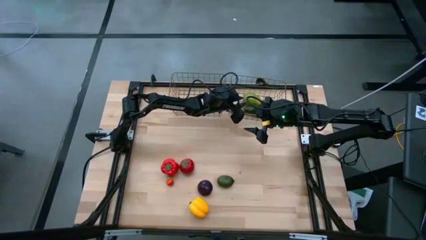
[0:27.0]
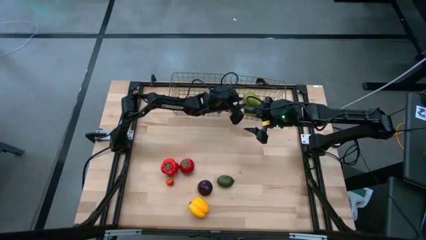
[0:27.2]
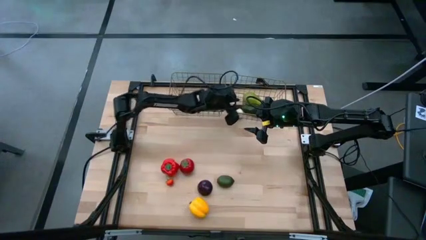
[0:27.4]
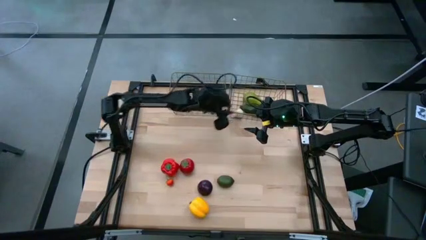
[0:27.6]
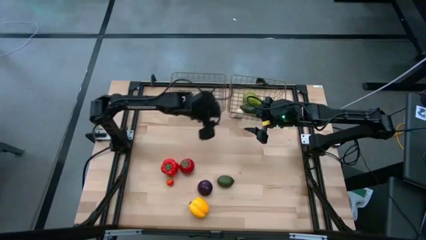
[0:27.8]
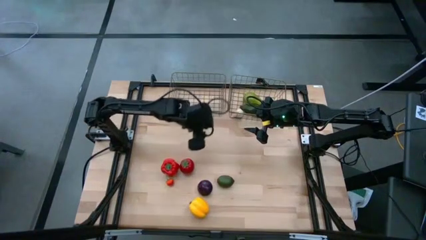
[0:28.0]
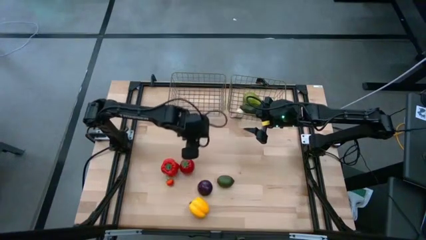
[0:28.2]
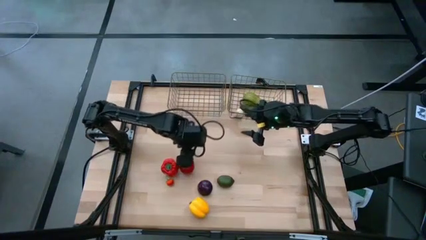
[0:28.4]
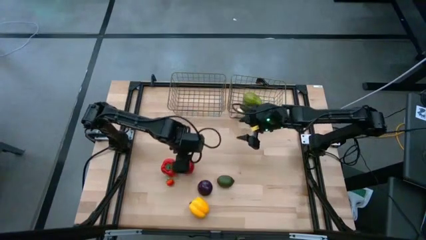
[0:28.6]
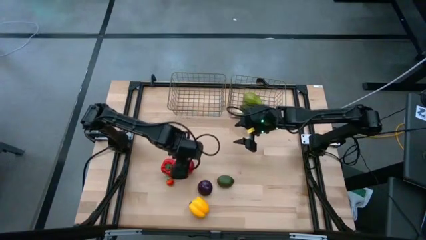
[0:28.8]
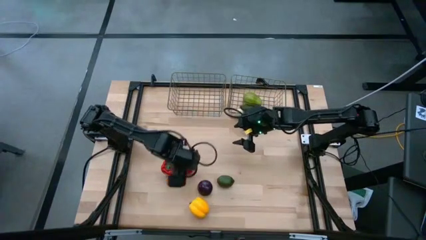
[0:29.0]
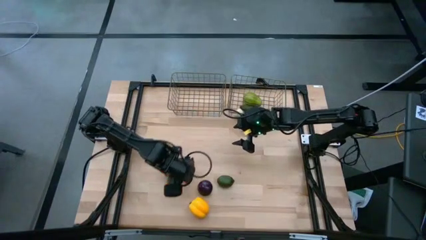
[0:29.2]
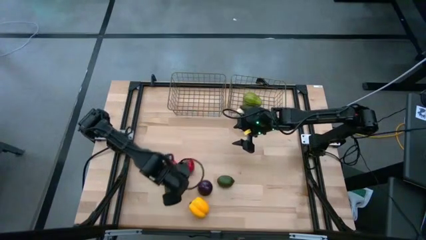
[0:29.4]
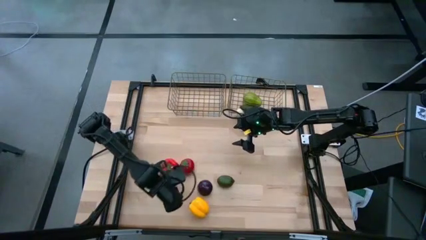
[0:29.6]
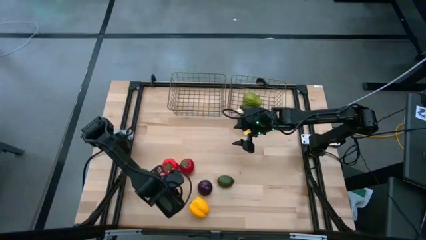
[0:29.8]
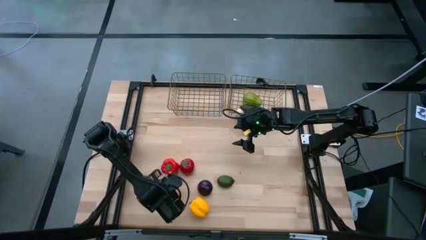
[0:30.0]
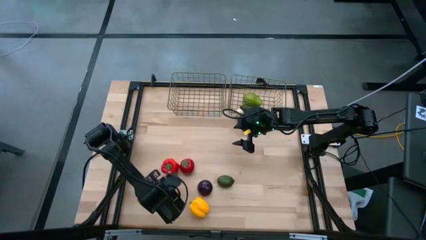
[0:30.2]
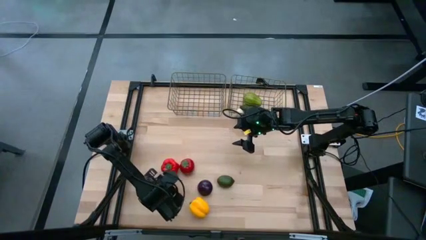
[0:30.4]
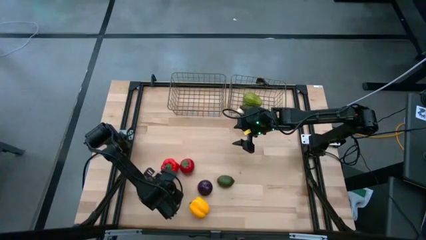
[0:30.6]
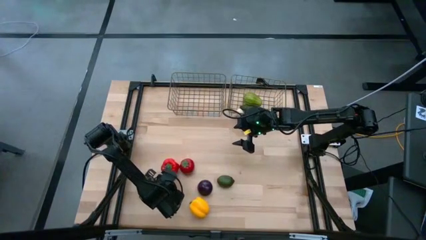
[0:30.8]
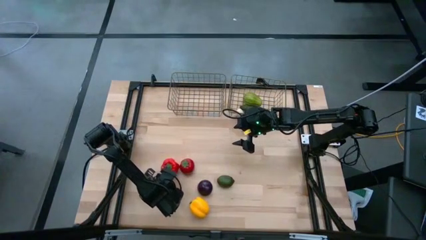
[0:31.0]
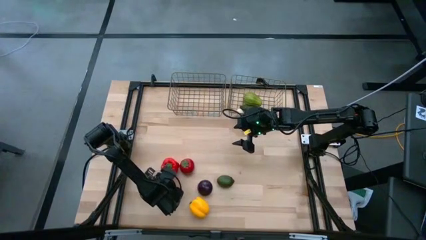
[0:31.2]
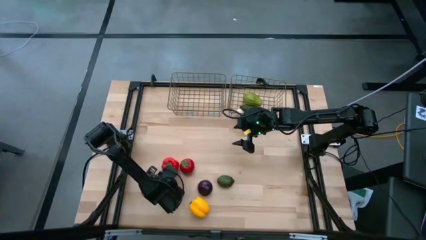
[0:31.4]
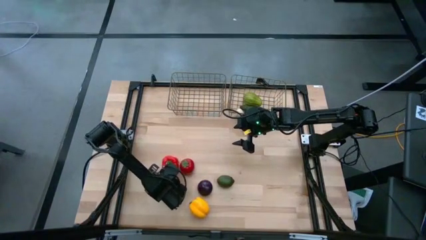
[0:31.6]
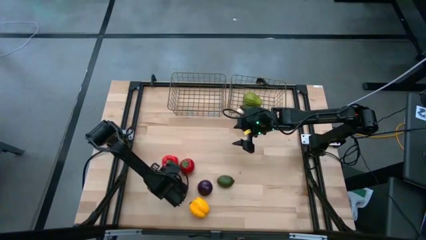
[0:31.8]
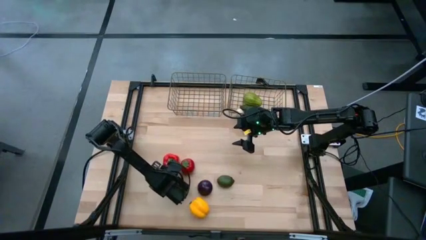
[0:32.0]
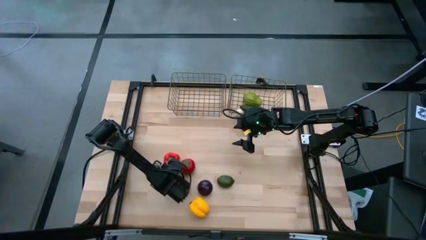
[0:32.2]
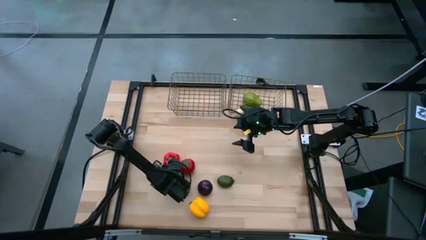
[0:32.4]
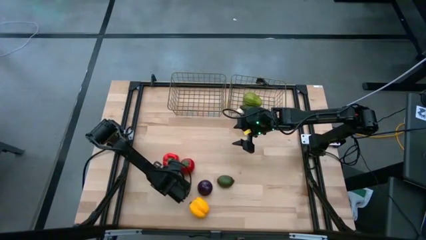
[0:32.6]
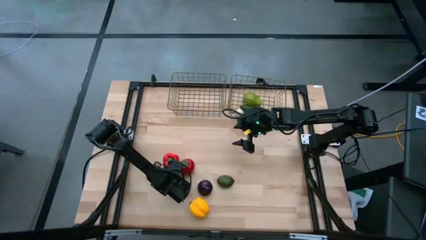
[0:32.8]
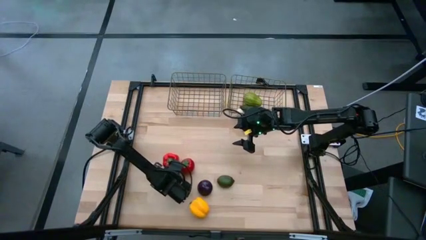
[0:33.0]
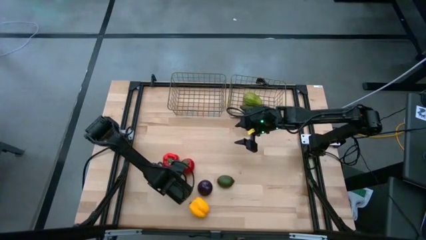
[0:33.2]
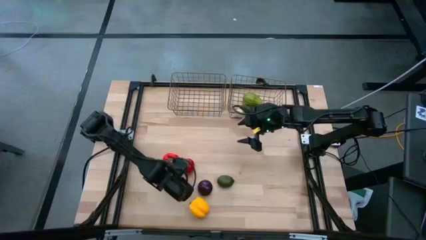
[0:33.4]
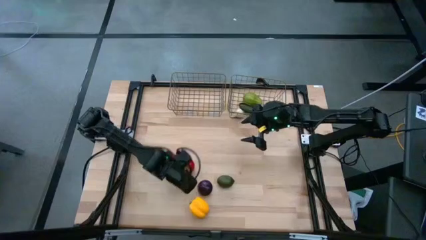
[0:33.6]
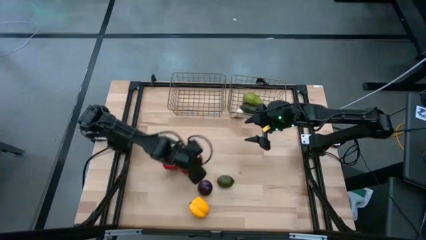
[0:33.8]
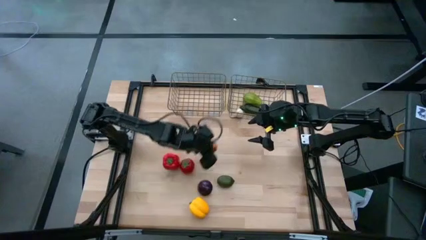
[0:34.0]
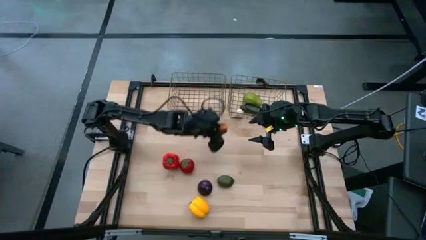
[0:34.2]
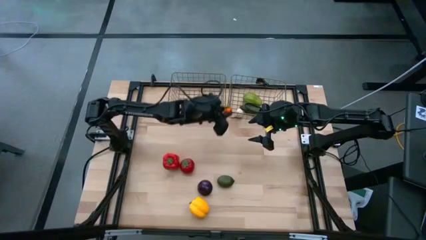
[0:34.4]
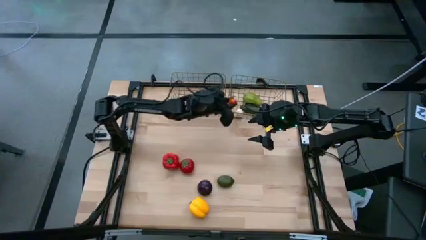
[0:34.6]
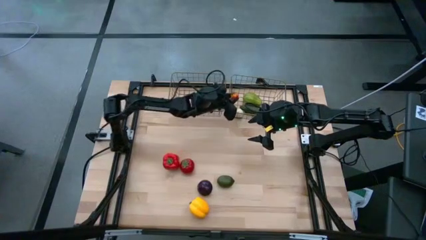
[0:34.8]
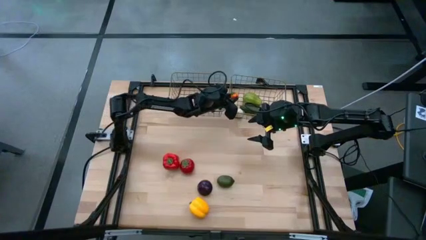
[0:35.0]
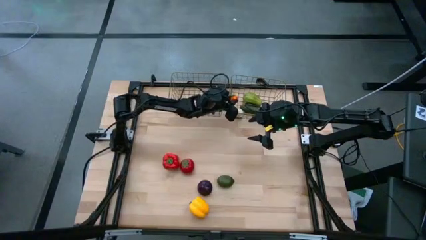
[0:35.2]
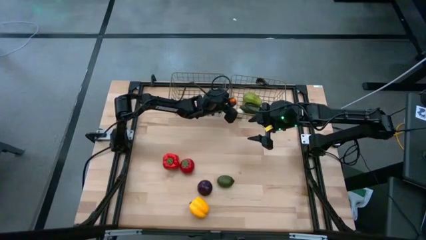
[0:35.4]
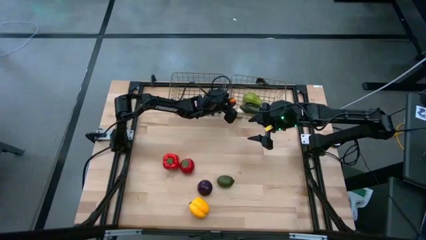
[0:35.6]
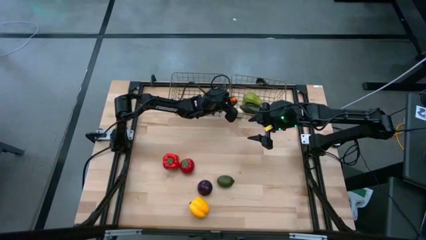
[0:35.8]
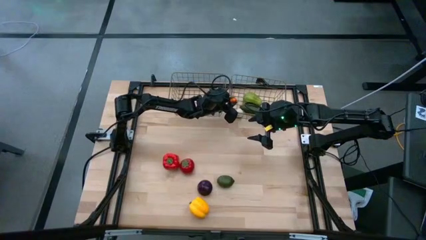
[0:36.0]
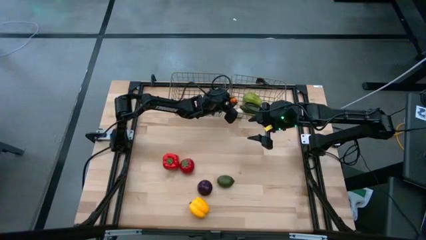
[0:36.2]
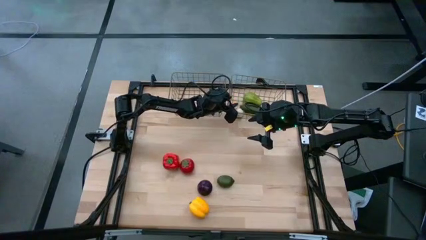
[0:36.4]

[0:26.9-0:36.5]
Task: Sort produce into baskets
Put the orange tomato into the right gold wire basket

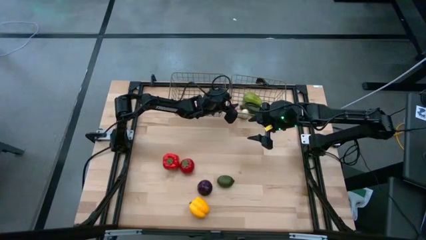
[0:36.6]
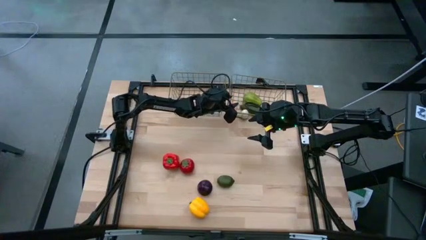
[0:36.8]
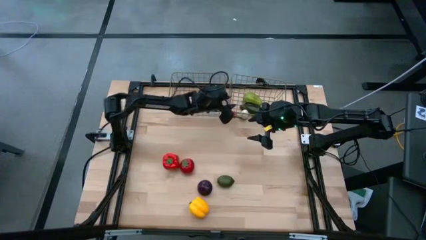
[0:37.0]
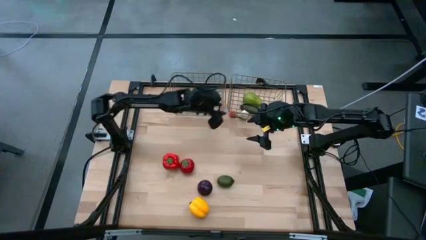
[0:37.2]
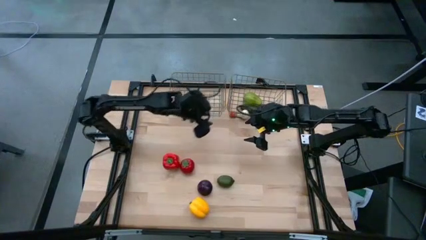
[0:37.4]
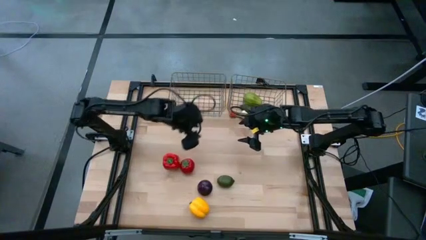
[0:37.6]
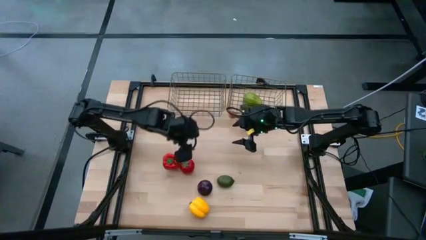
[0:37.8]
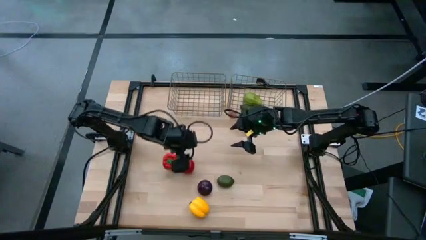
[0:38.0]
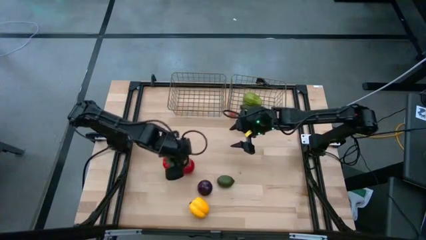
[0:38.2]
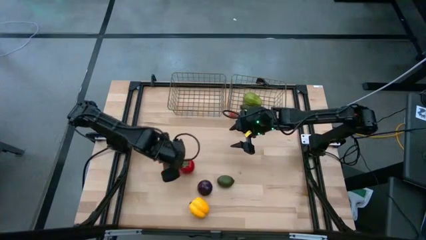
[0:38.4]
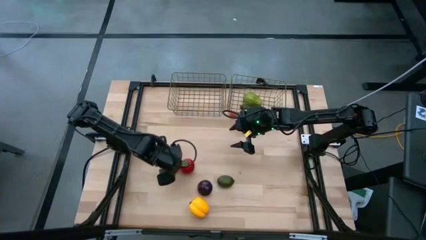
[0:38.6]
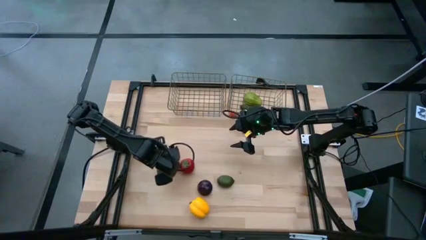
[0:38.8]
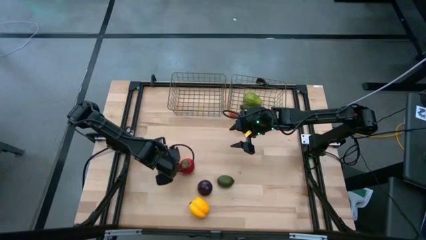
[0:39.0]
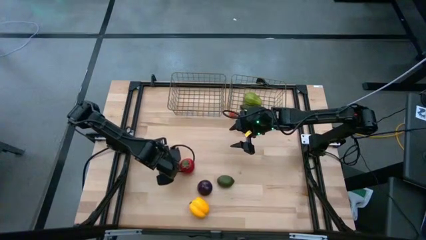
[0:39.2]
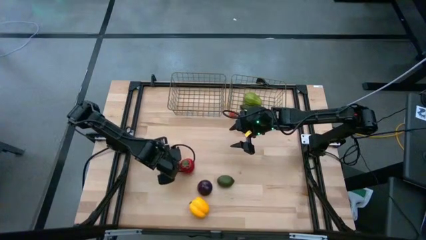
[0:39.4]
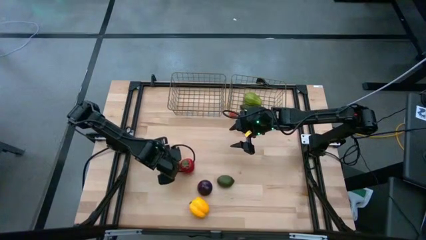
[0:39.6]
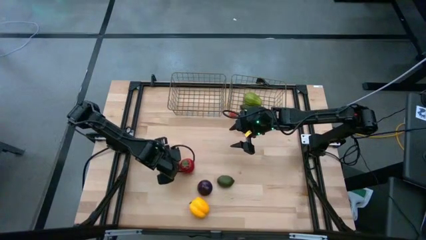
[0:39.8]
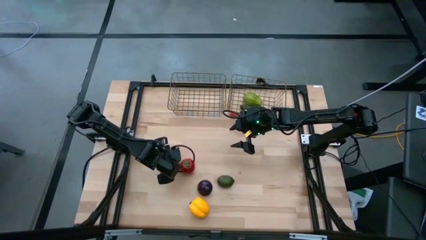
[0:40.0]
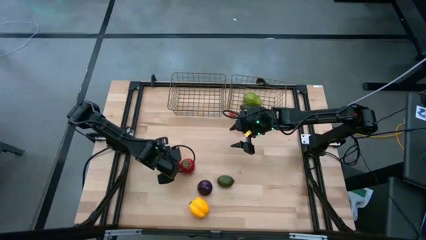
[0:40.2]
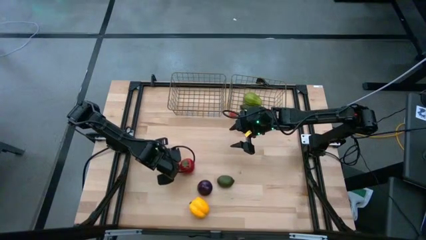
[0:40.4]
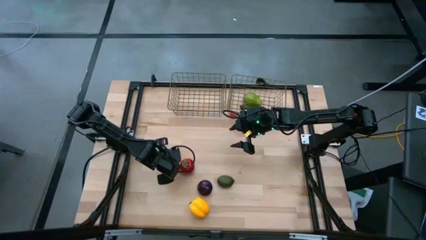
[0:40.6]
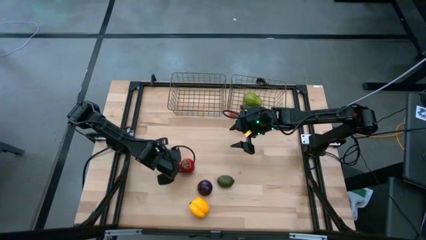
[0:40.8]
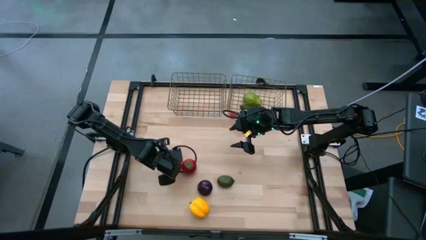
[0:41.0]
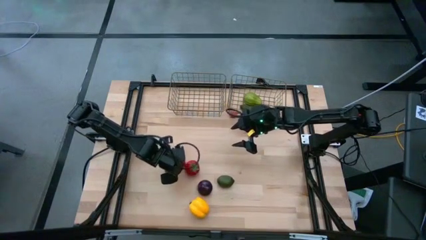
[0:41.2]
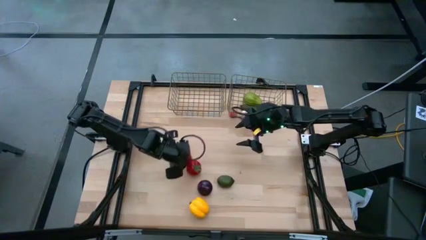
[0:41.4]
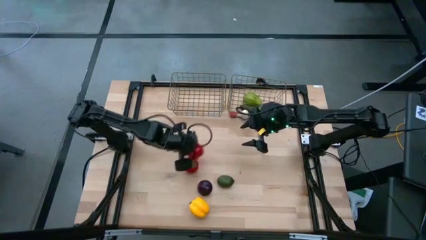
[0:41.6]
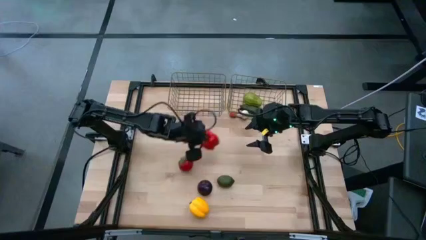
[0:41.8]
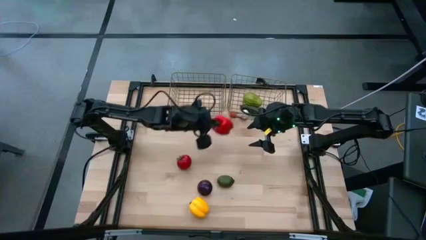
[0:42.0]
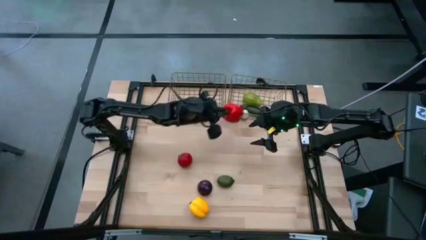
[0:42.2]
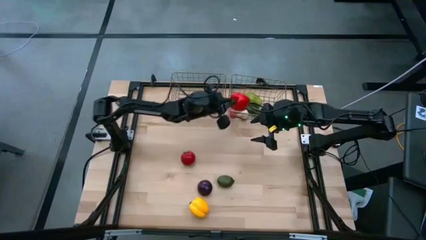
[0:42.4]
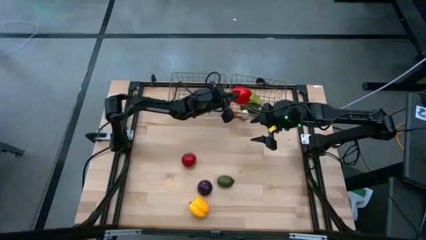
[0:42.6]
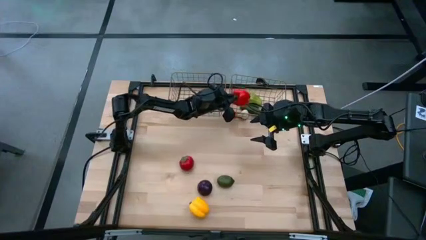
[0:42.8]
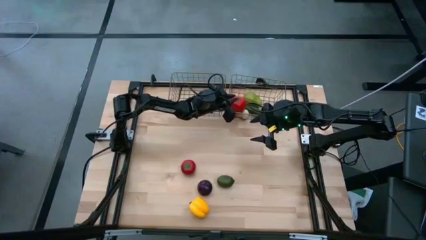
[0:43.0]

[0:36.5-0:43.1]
Put the red bell pepper into the right gold wire basket
